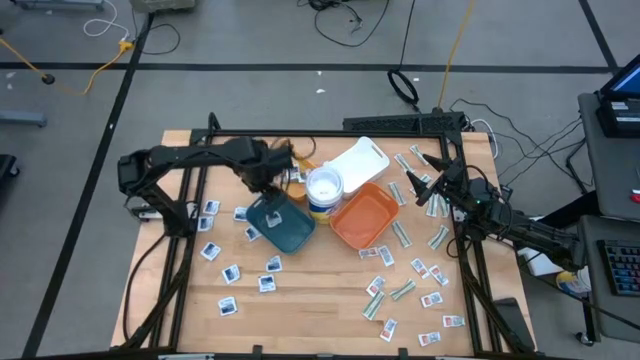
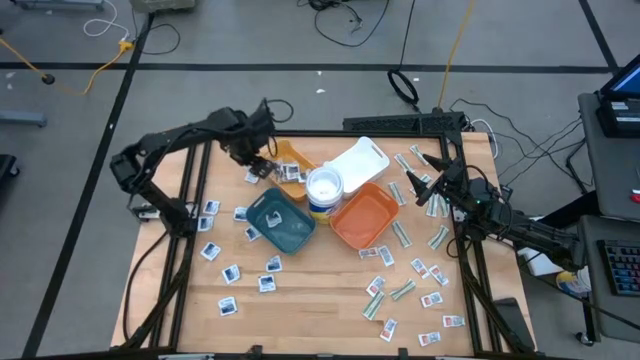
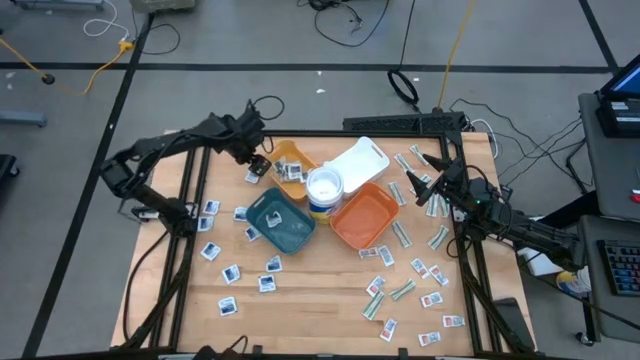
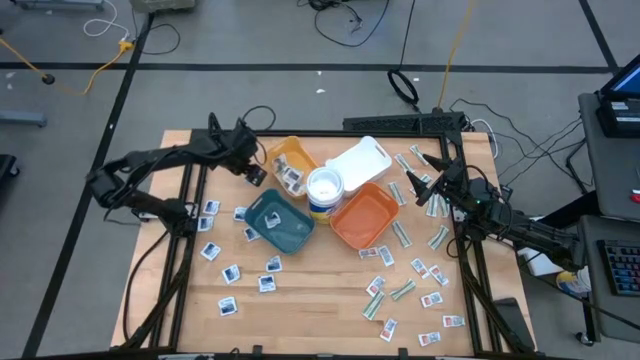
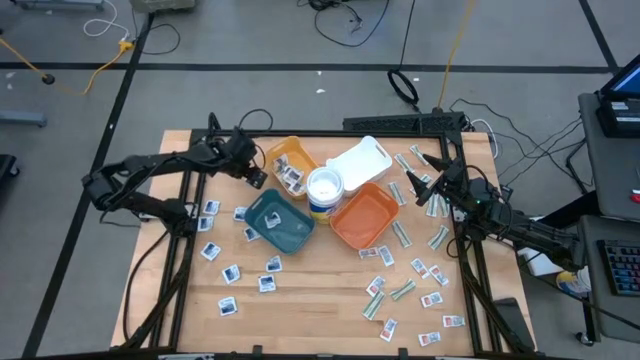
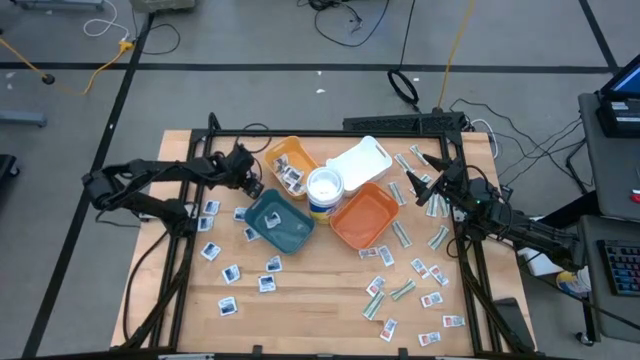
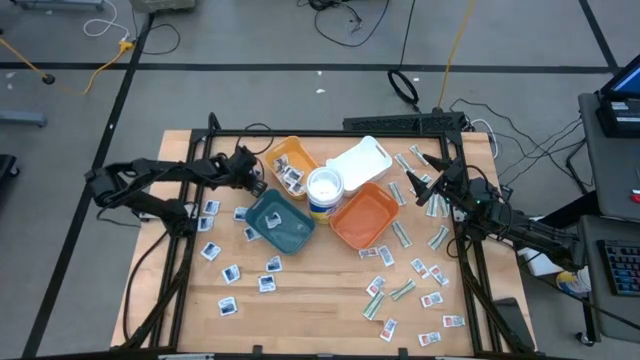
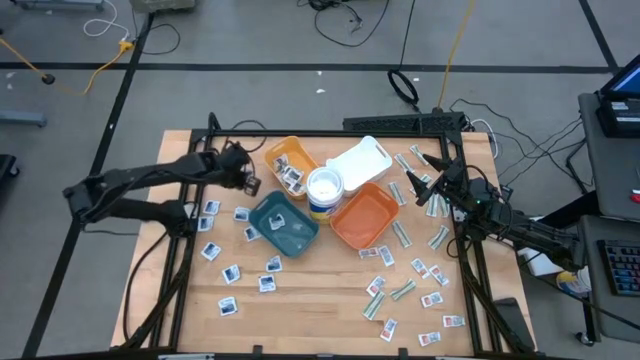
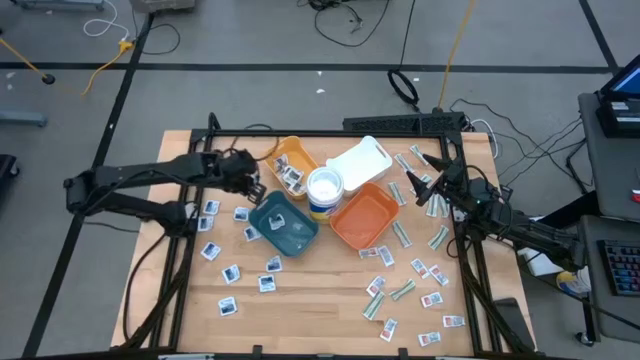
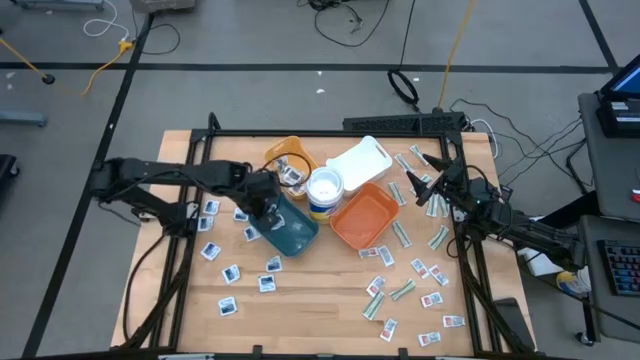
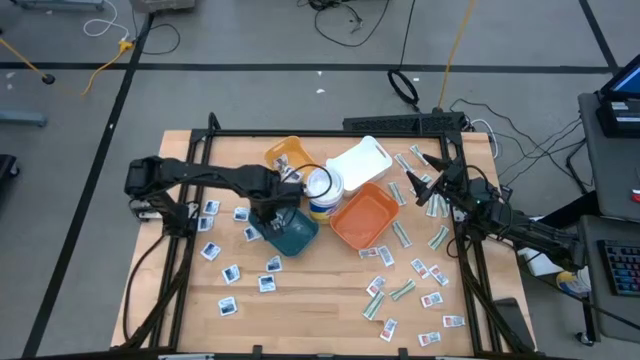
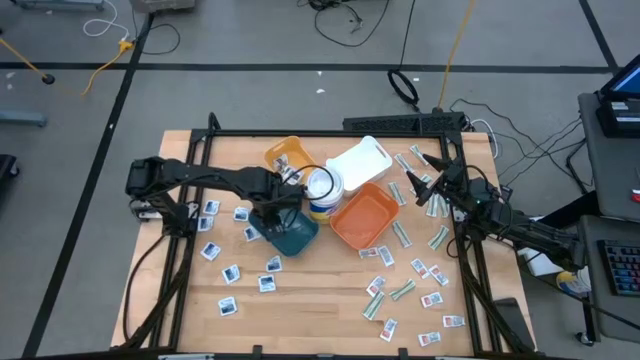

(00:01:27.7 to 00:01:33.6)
Task: Pick & Place First Aid Supplies
Put the blue pad into the blue bin

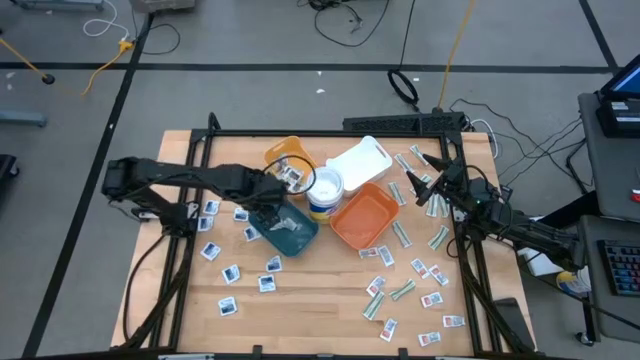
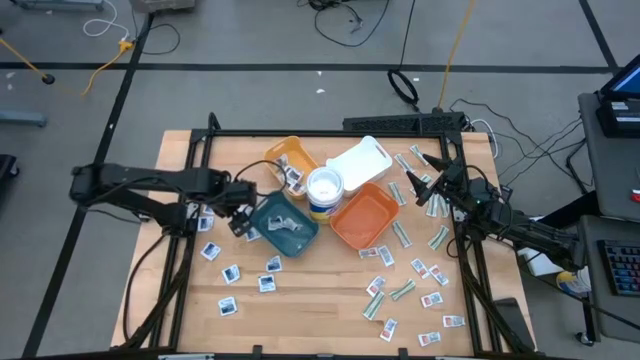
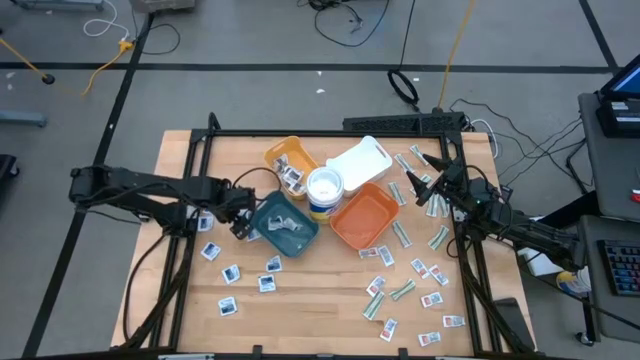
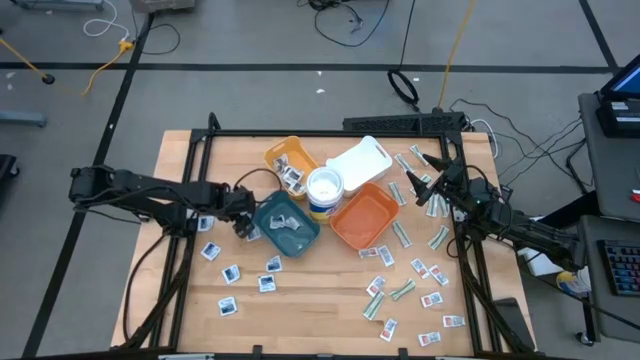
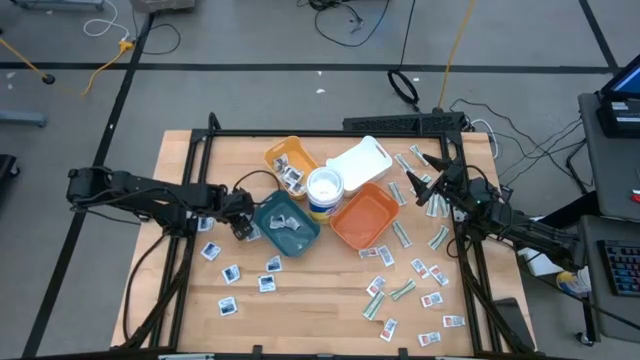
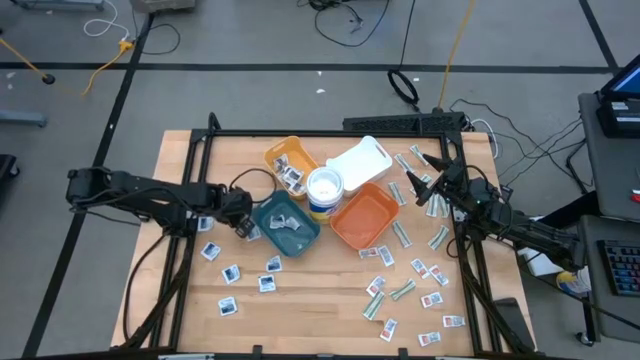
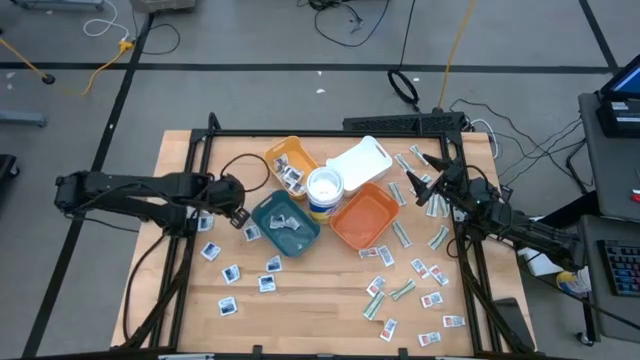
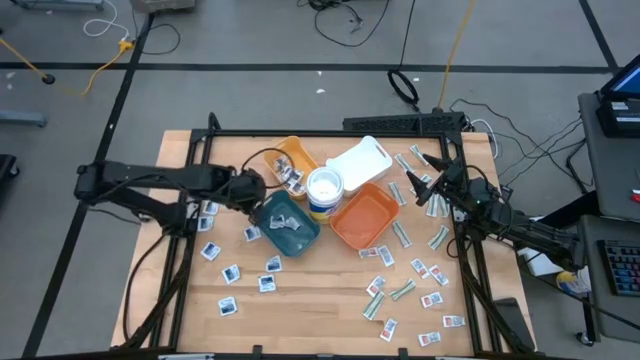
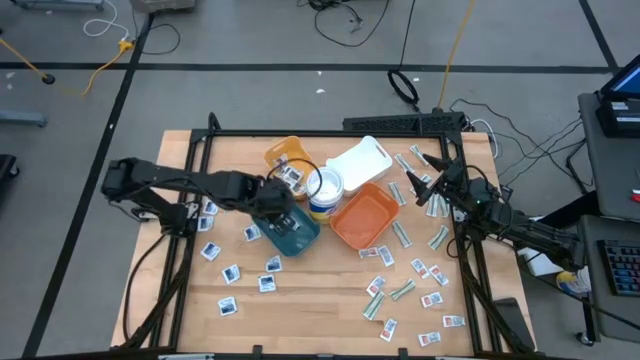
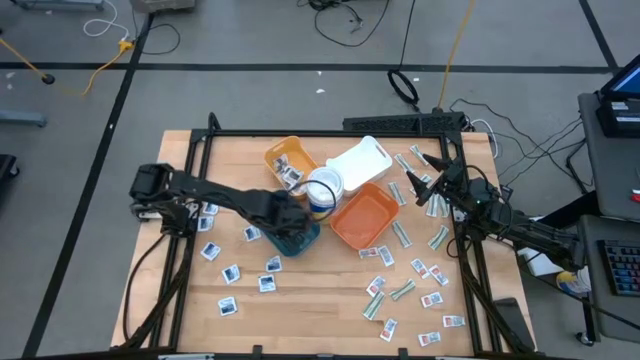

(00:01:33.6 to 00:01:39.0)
Put the blue pad into the blue bin

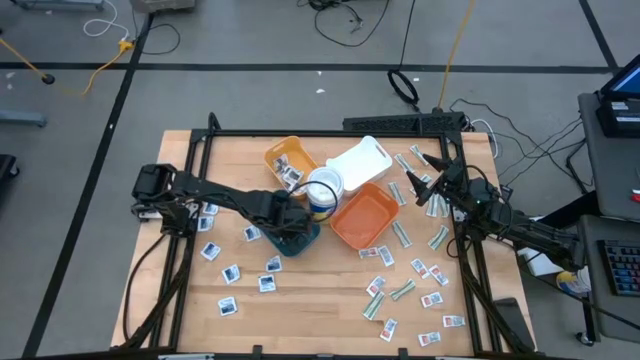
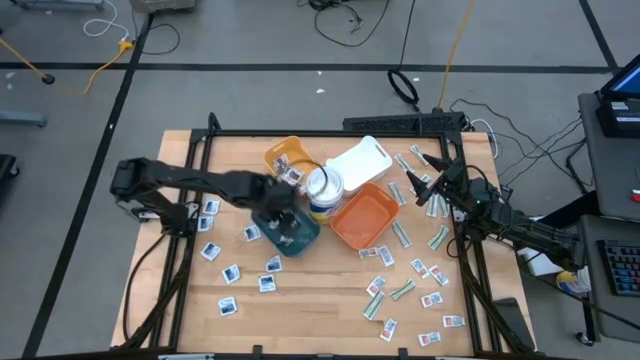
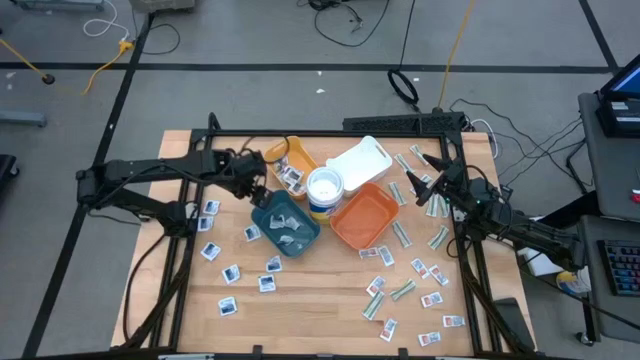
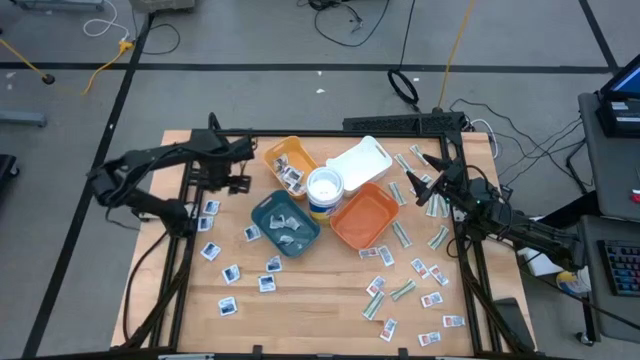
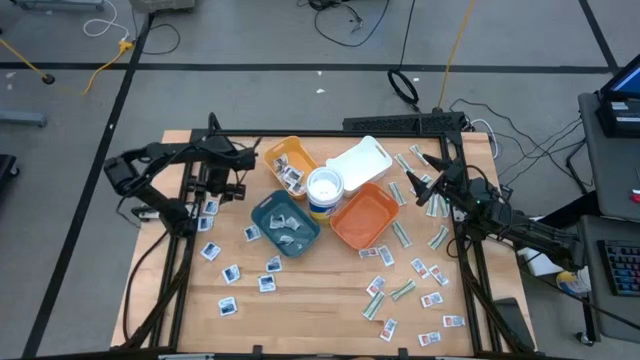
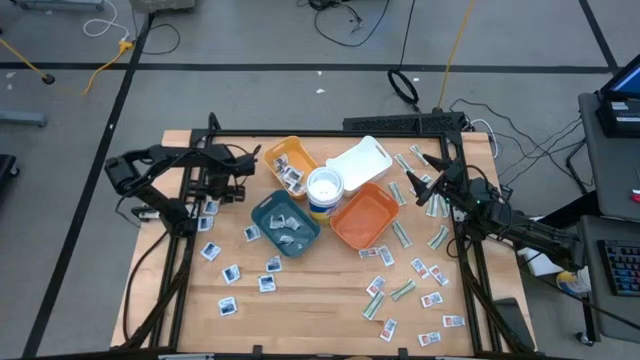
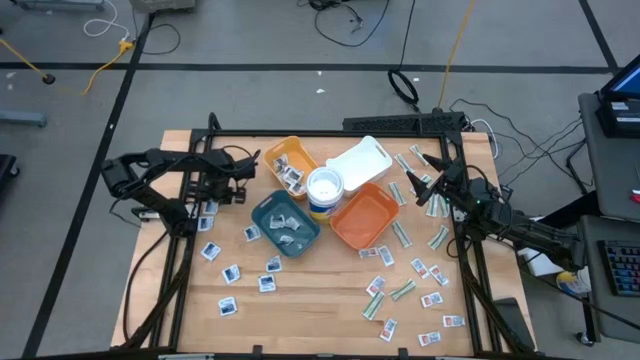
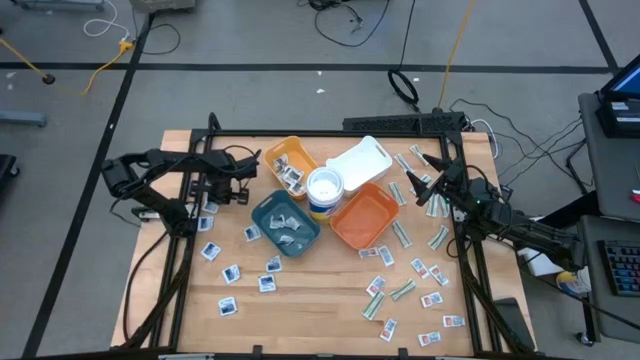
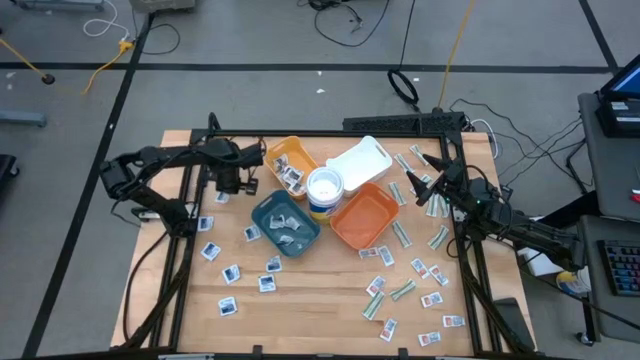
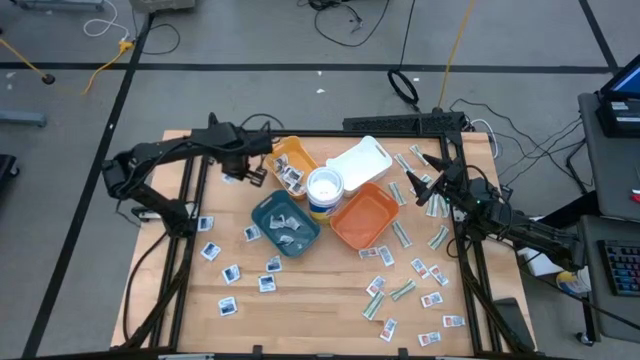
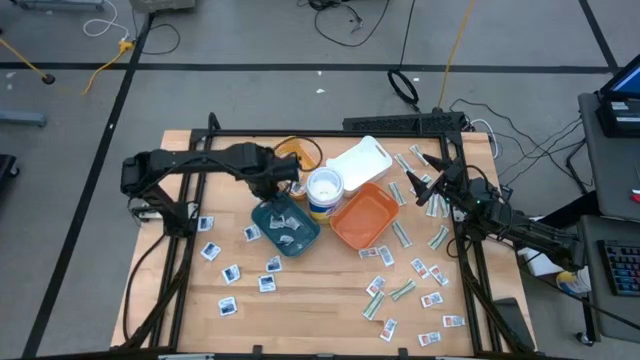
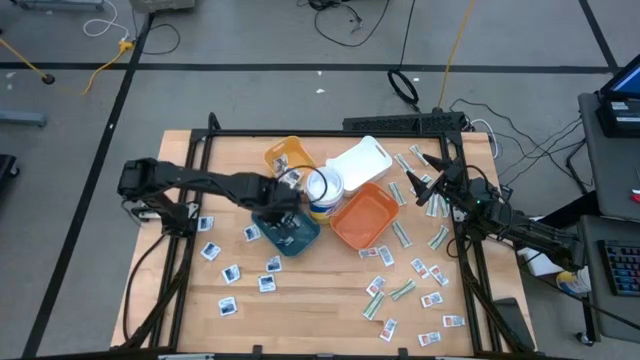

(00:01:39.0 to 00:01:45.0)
Put the blue pad into the blue bin

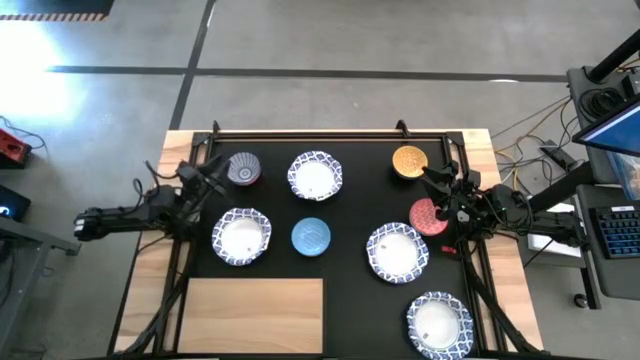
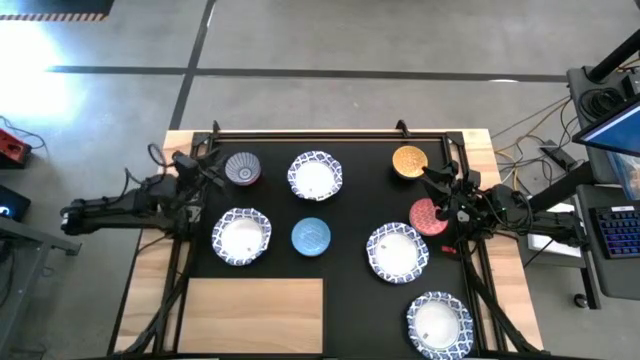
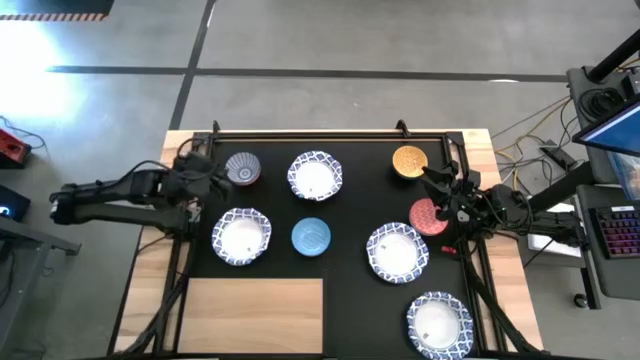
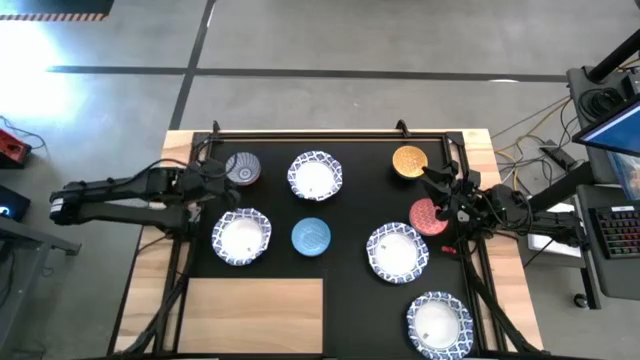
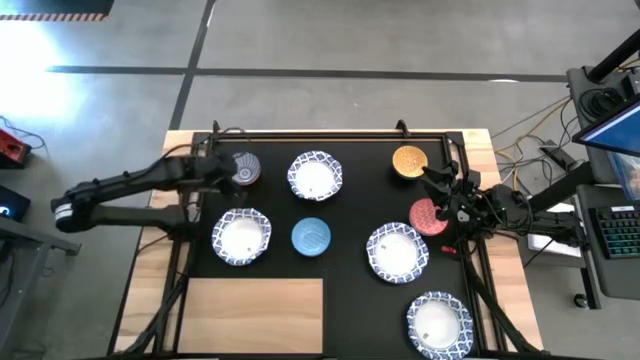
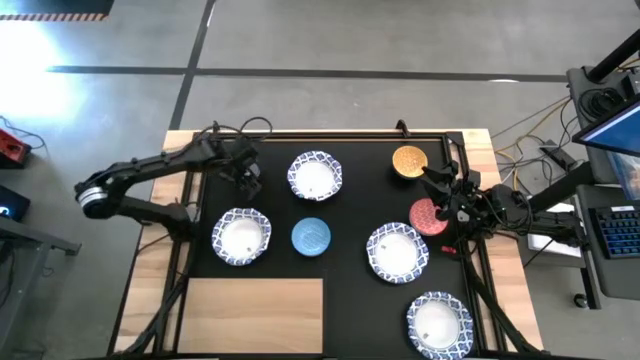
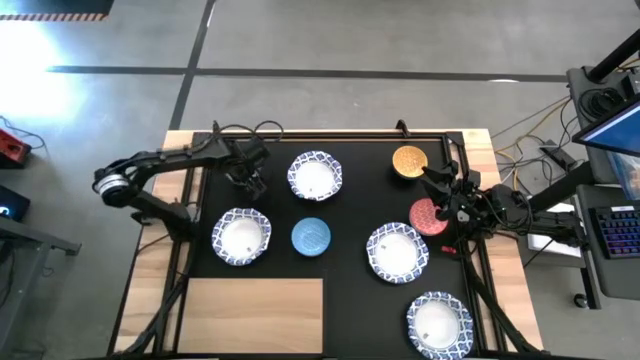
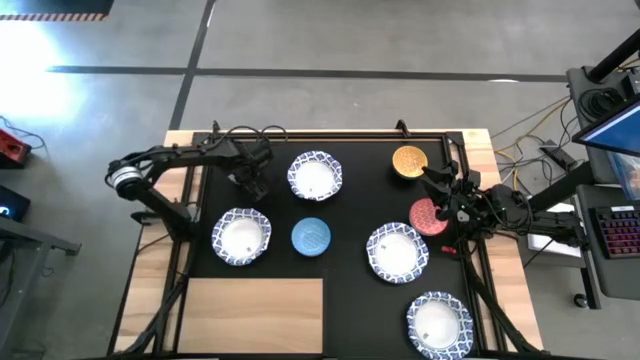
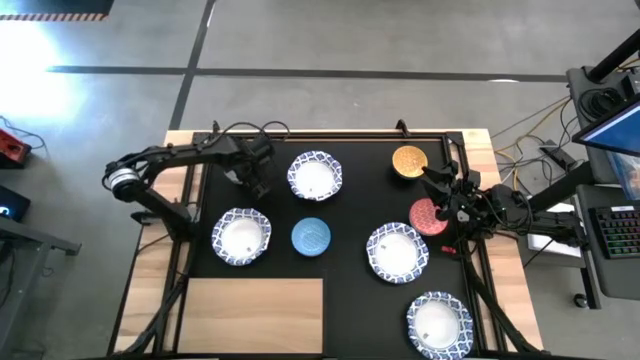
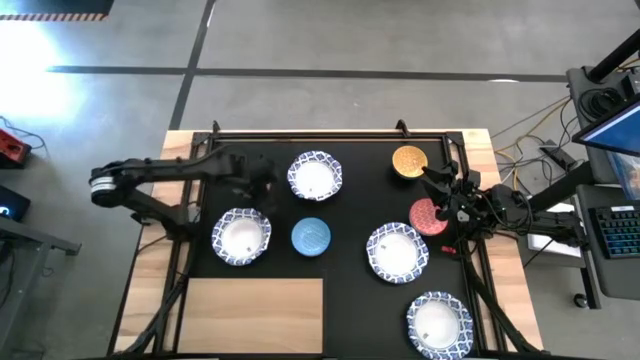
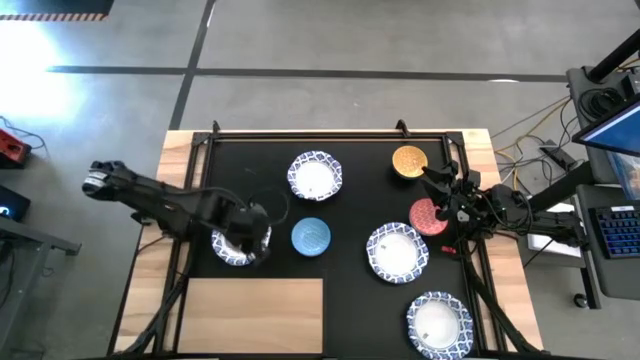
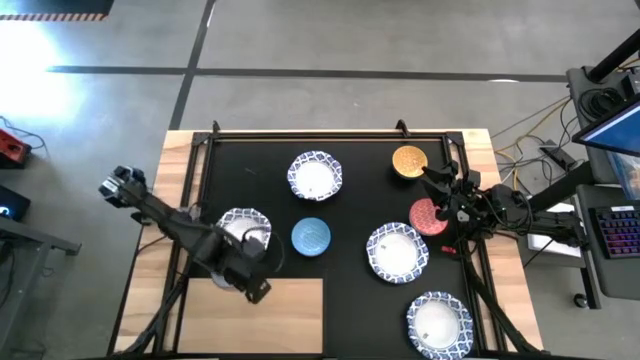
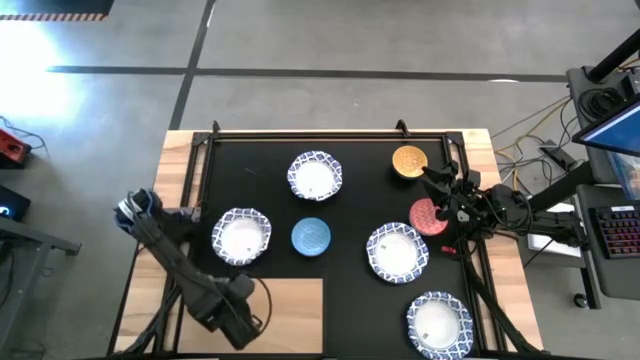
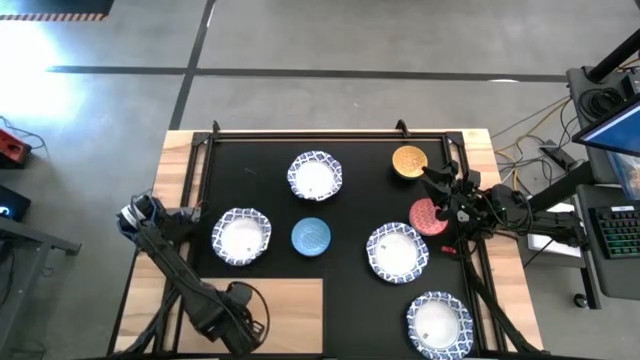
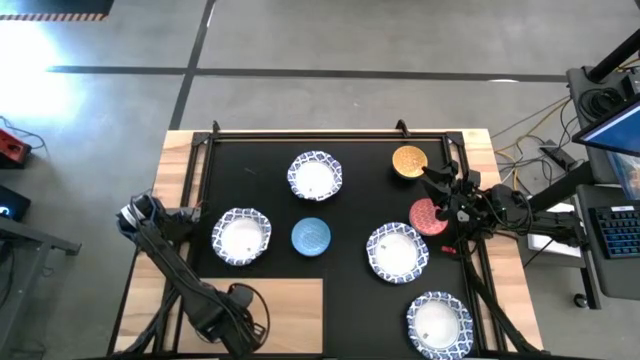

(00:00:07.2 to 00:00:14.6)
Task: Place and stack bowls onto a shelf
Put the dark blue patterned bowl on the shelf
